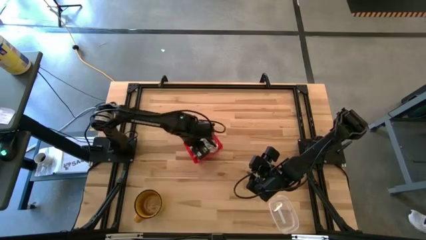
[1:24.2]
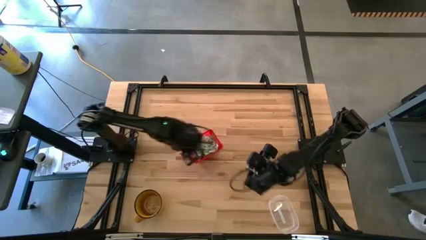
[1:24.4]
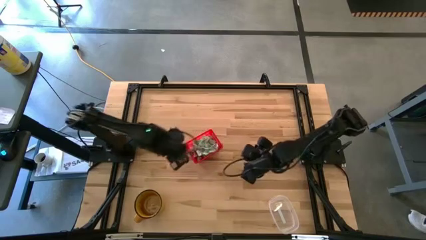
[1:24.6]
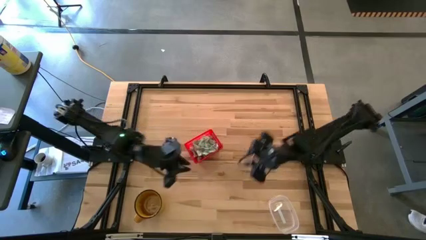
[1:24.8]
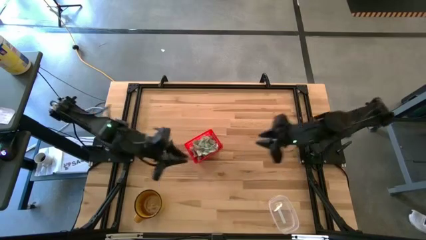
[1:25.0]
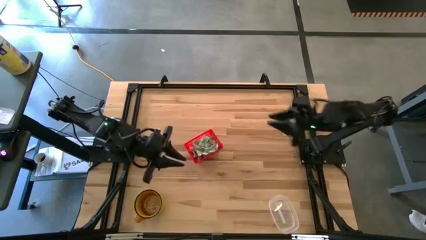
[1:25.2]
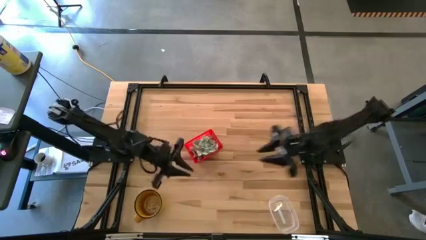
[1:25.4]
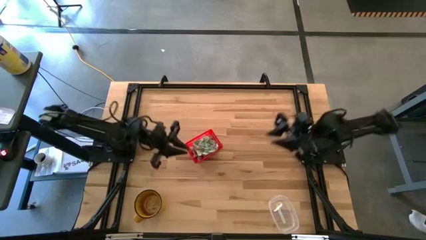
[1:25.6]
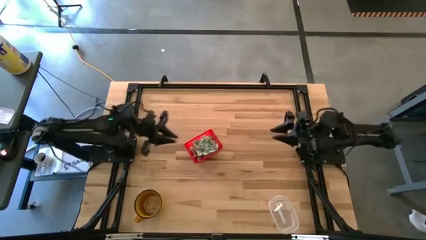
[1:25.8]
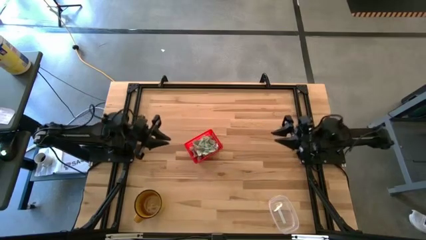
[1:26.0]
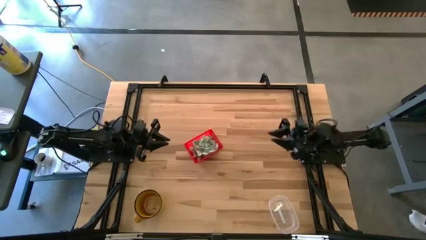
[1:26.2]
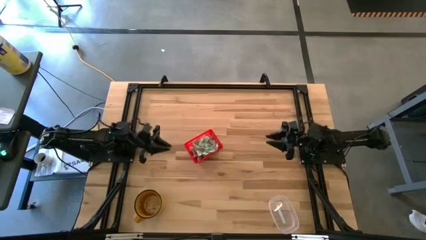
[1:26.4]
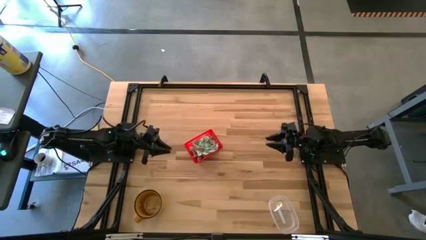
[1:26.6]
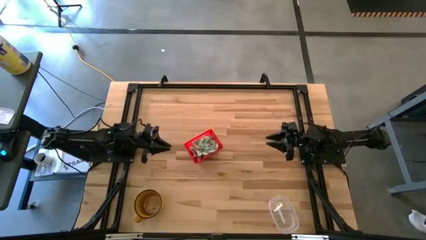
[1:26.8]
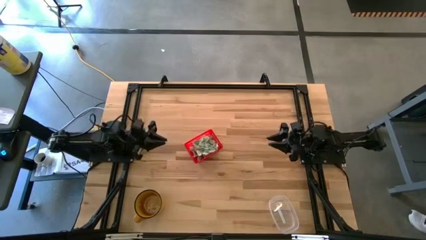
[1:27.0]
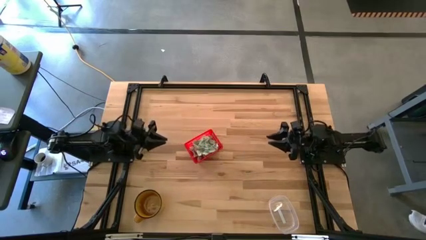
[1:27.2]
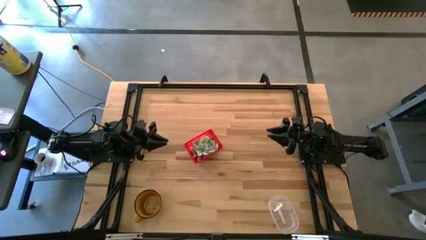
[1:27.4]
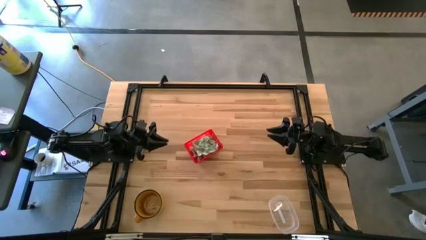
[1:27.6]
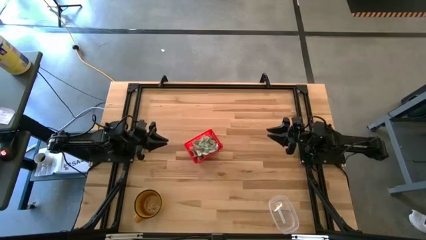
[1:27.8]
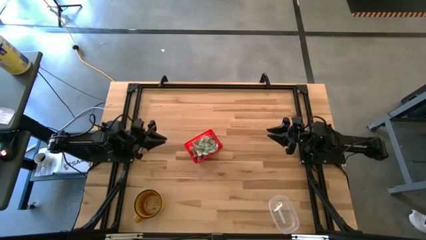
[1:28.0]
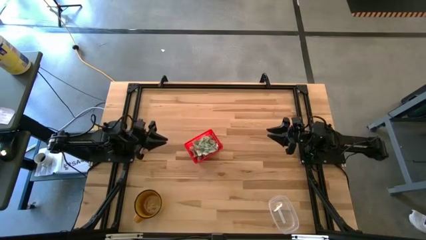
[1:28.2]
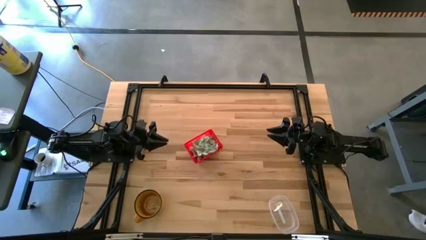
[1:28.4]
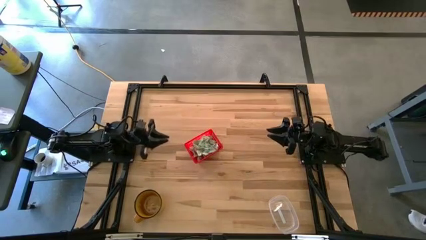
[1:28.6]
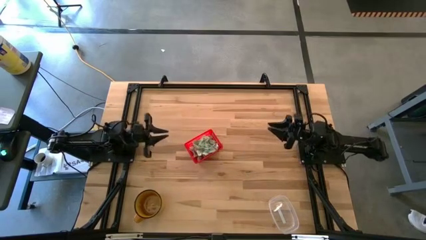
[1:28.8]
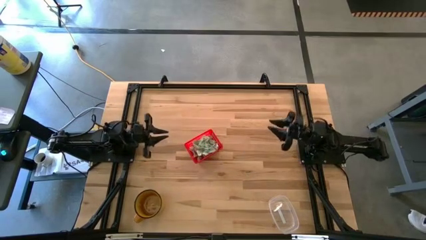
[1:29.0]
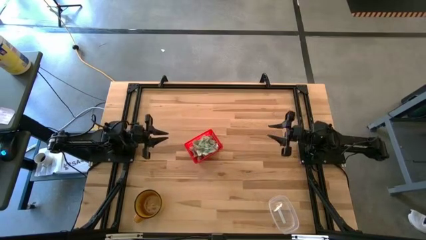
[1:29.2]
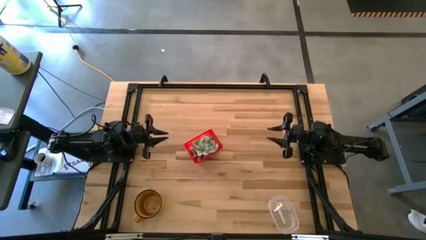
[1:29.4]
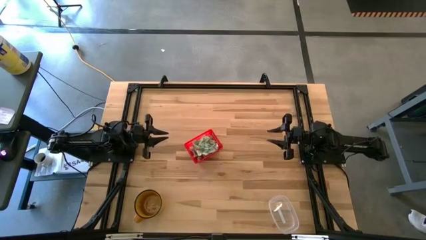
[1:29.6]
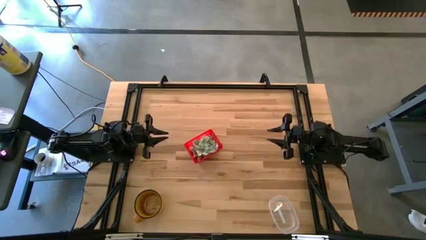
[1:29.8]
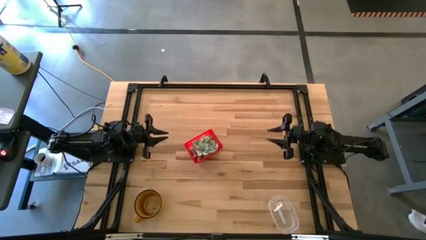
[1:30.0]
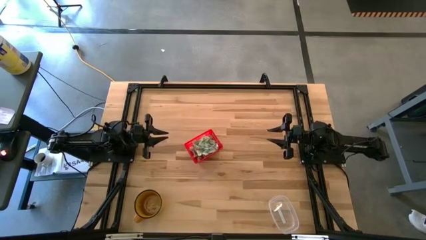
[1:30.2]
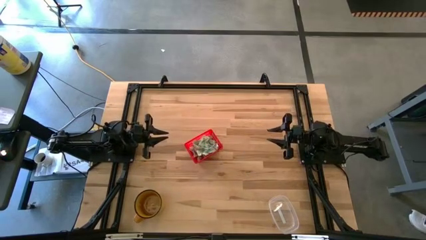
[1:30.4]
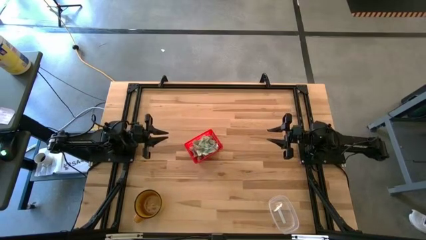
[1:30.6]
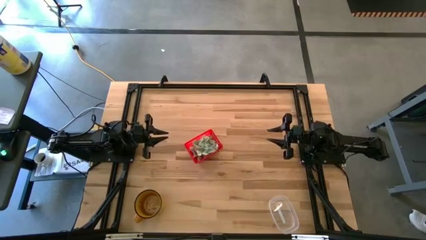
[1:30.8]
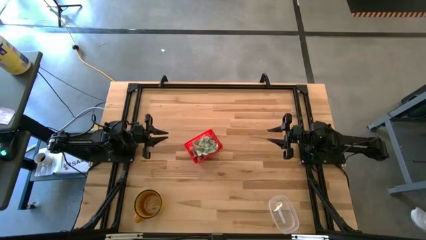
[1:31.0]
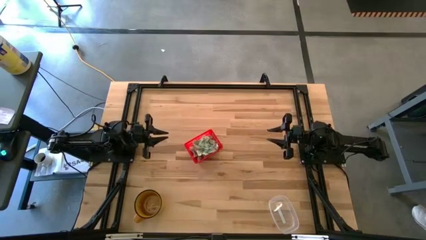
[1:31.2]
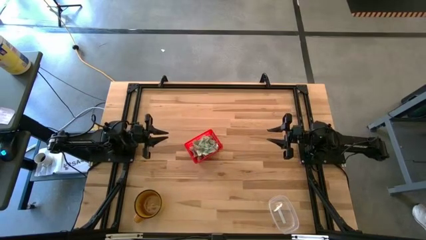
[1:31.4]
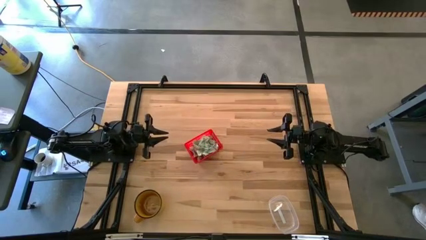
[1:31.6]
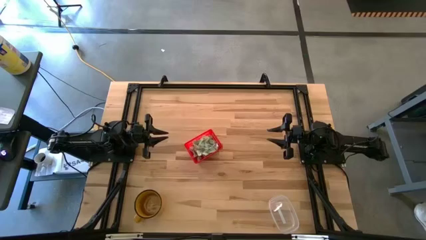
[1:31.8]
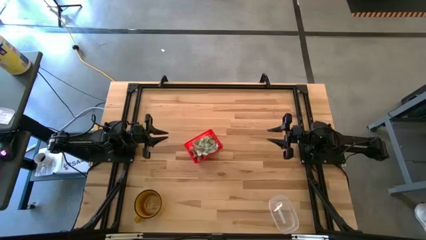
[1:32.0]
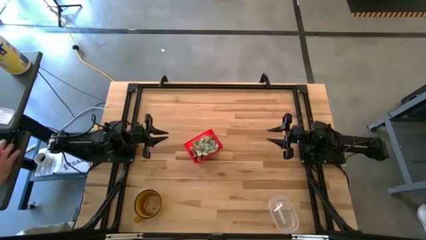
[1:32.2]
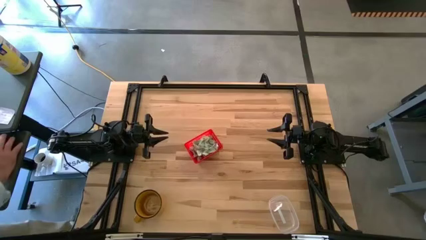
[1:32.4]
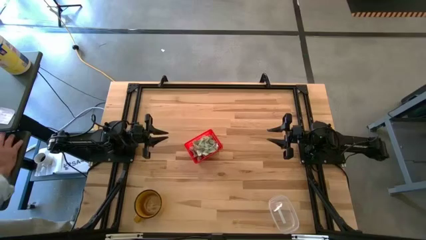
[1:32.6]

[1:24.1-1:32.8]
Task: Pick and place Stevia / Truvia into bins
Return to Home Position

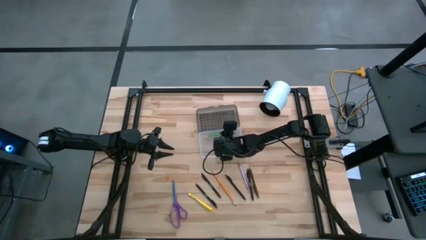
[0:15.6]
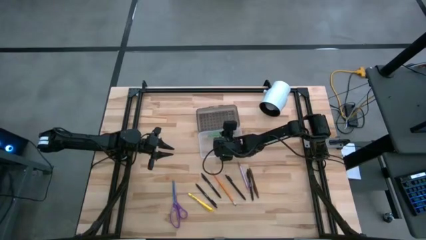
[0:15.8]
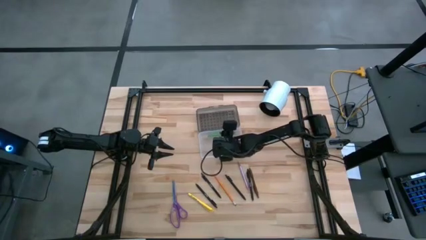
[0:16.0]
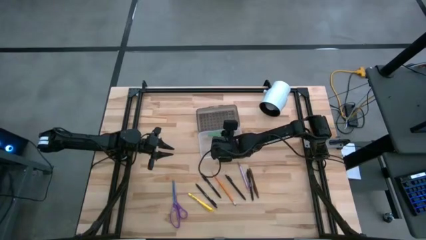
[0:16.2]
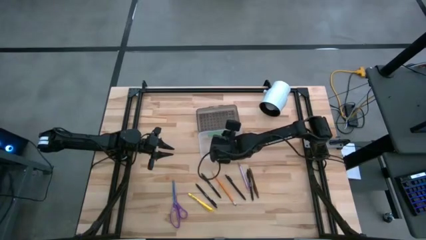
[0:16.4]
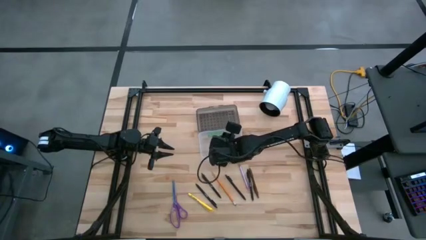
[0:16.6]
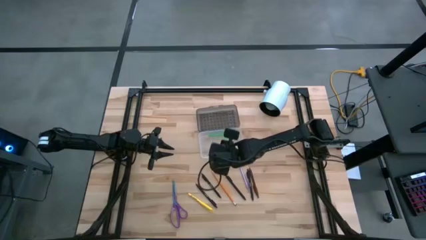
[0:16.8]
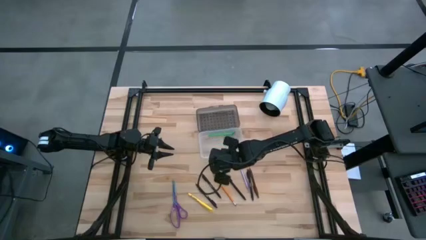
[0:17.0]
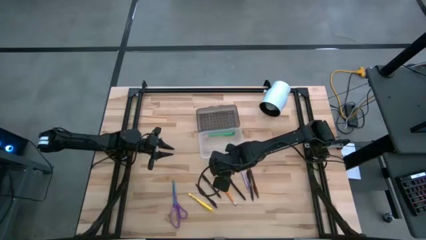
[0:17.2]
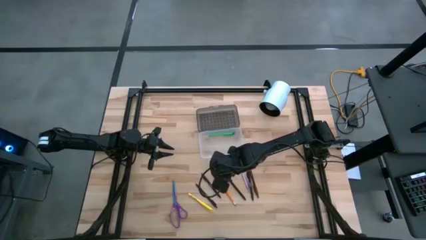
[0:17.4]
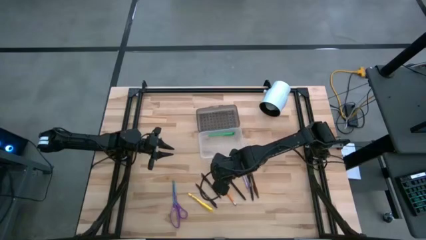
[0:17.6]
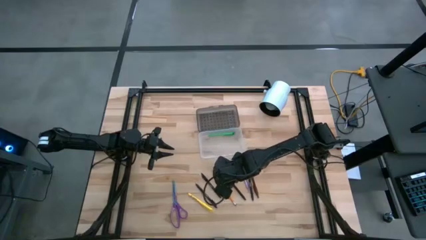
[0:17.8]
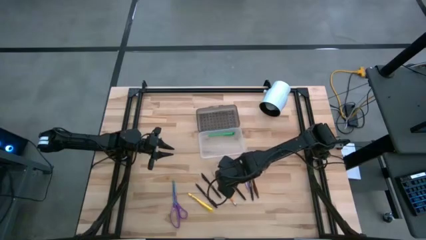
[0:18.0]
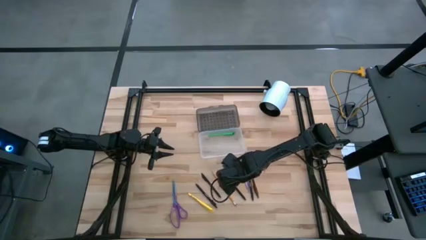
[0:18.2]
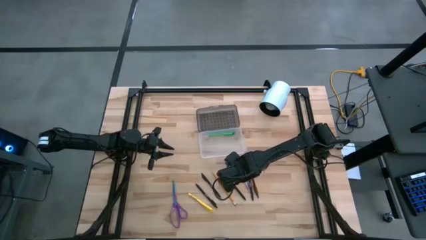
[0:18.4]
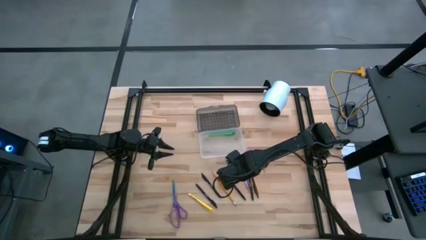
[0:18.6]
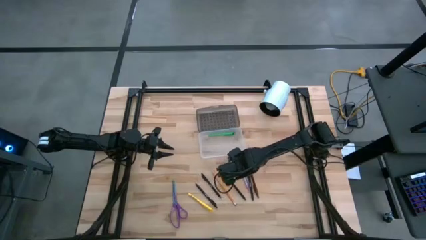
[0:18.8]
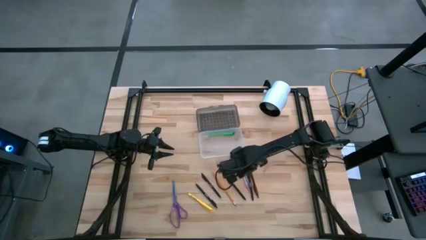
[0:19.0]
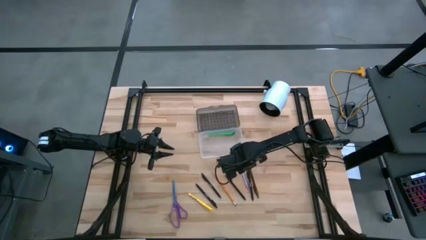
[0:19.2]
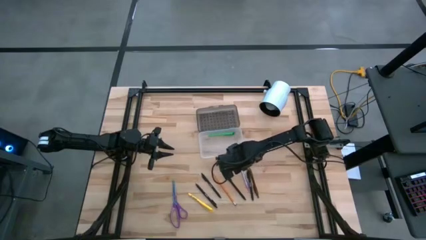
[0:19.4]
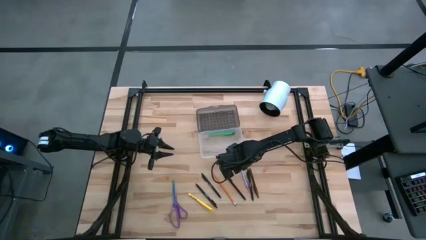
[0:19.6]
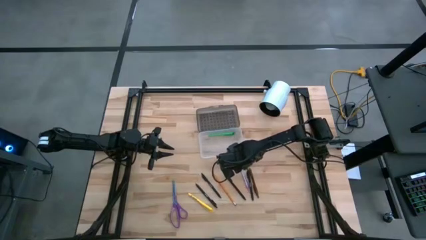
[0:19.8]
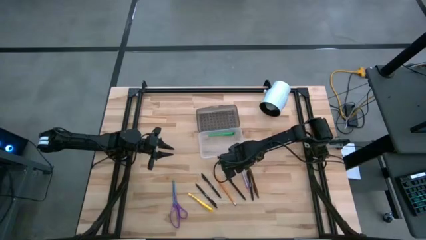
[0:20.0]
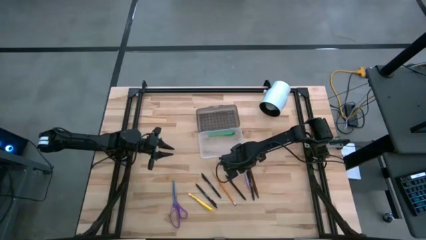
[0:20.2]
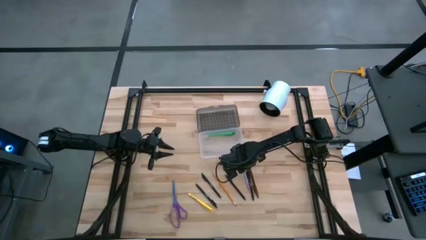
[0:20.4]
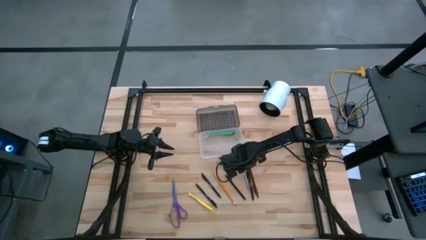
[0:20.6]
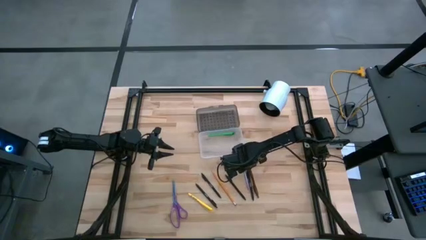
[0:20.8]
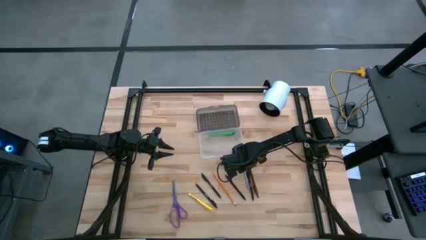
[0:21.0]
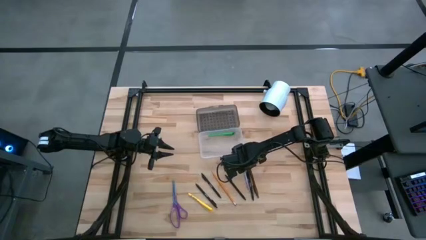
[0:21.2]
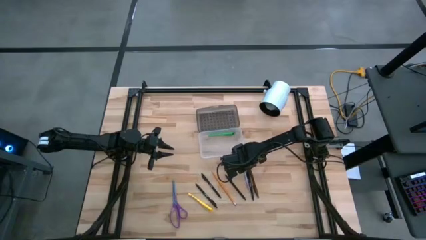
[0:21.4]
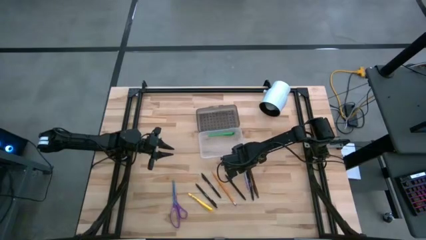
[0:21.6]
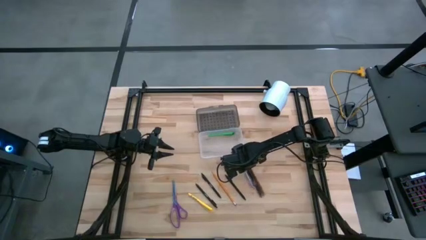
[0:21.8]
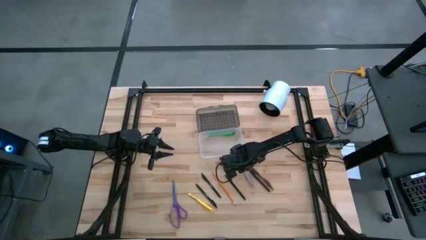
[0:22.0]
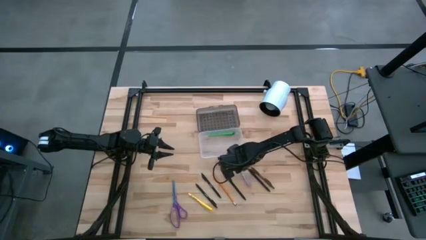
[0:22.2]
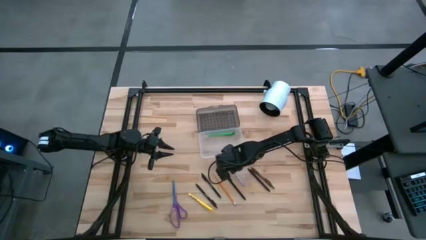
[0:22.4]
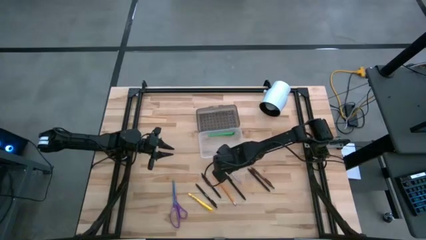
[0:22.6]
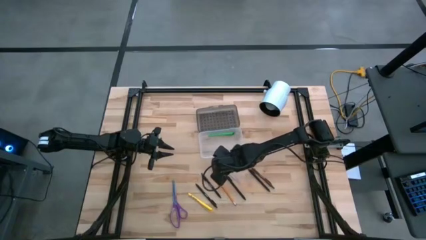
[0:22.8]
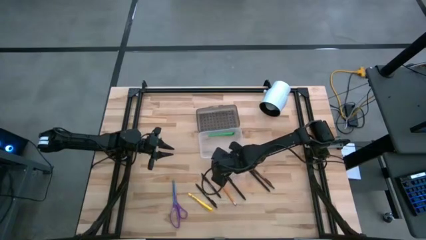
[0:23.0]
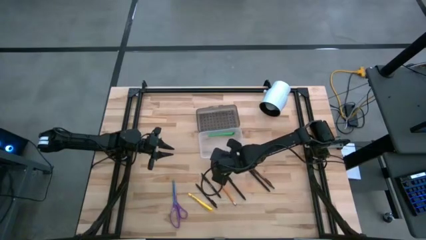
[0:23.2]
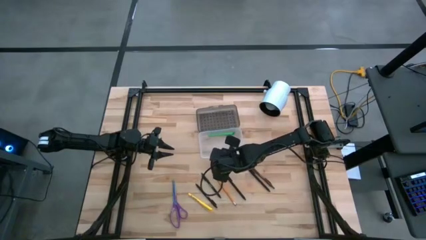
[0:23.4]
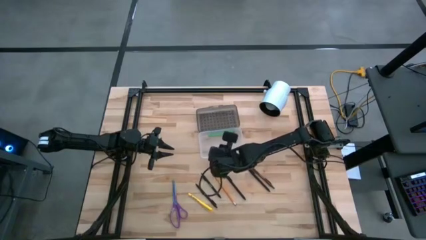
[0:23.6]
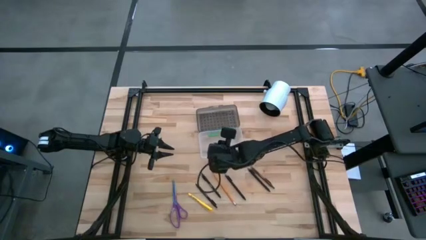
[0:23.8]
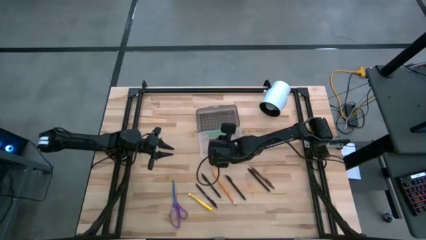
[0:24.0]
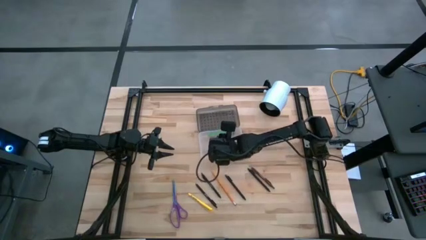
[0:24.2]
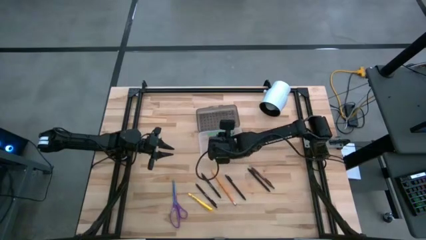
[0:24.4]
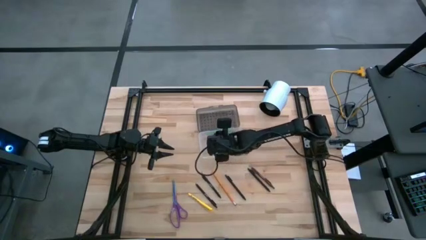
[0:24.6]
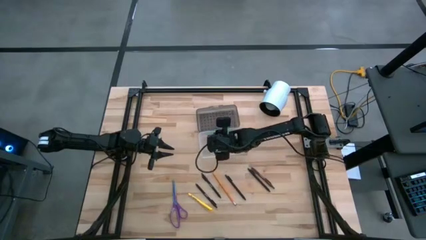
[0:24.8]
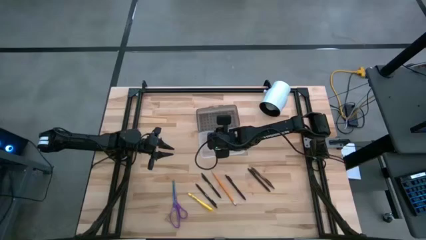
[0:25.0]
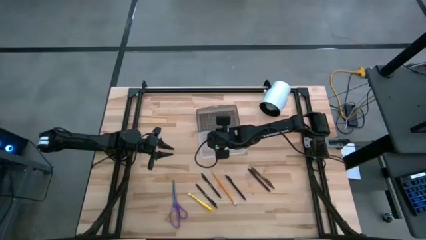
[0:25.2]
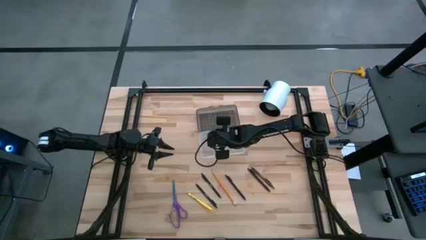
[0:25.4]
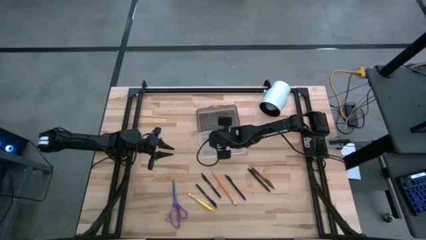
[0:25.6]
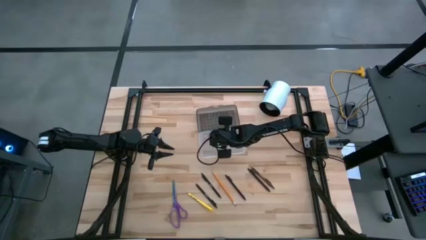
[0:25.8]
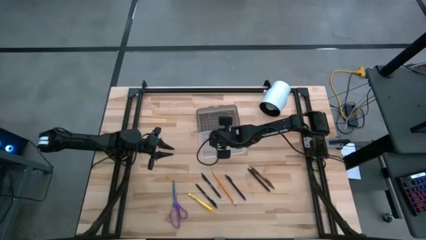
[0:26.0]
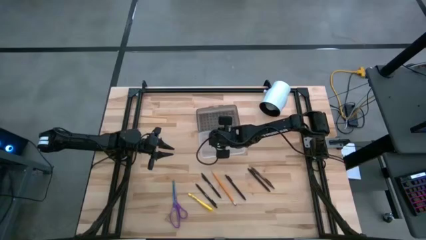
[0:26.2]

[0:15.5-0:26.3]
Task: Pick & place school supplies into a supply box
Put the purple pen into the transparent supply box
